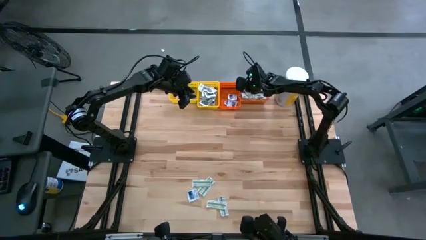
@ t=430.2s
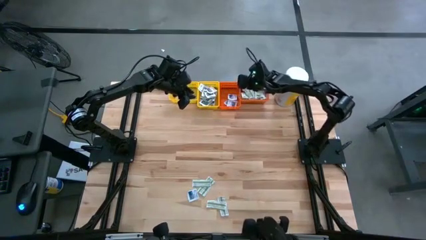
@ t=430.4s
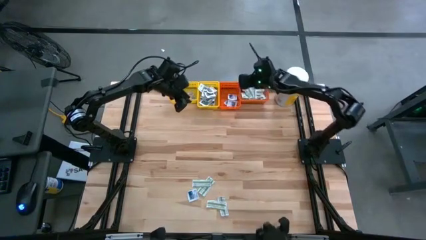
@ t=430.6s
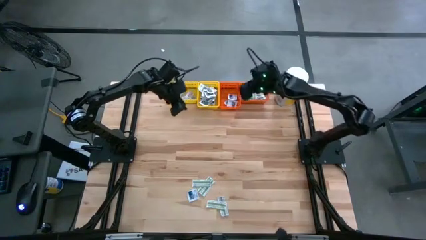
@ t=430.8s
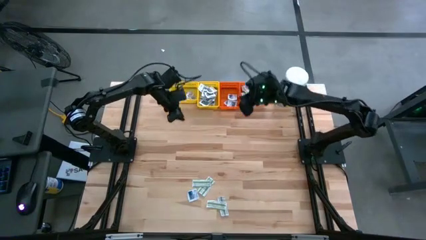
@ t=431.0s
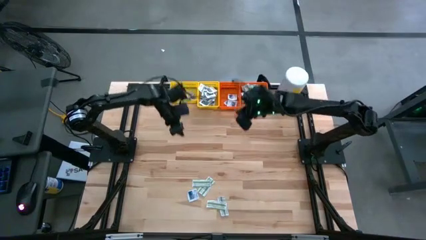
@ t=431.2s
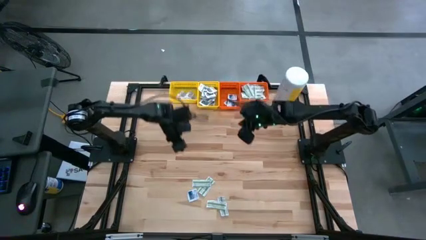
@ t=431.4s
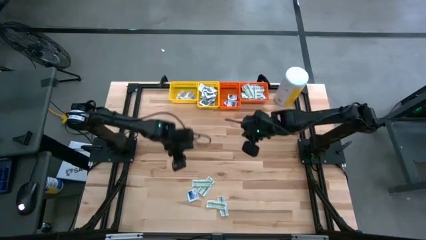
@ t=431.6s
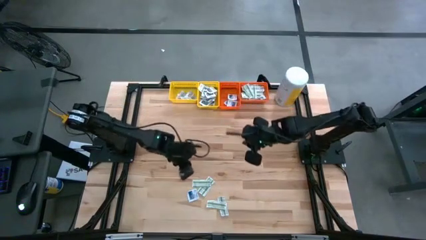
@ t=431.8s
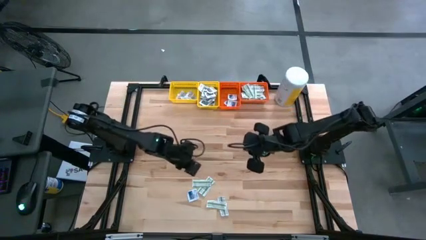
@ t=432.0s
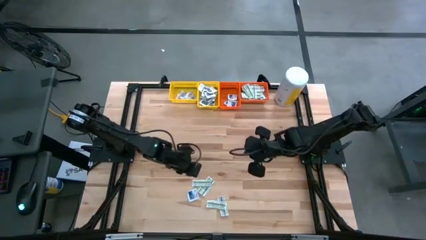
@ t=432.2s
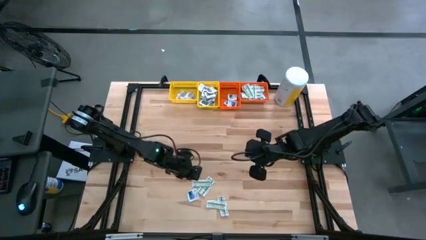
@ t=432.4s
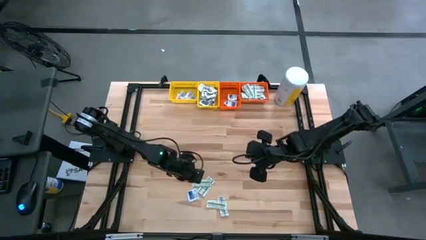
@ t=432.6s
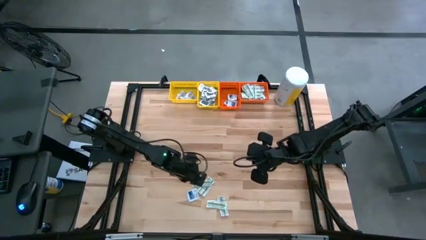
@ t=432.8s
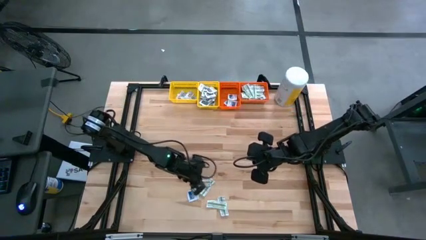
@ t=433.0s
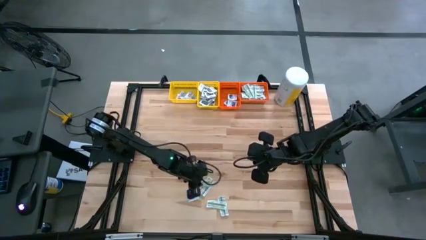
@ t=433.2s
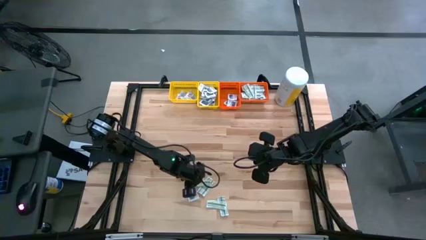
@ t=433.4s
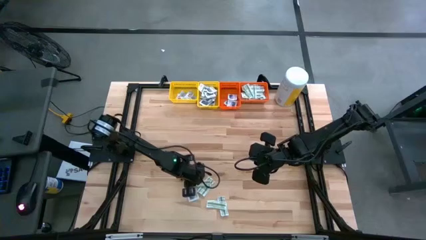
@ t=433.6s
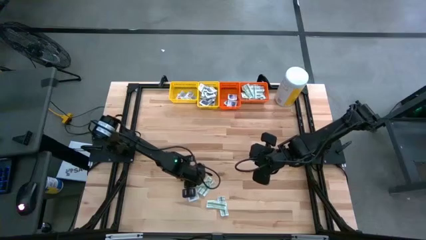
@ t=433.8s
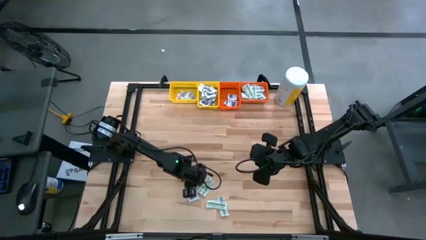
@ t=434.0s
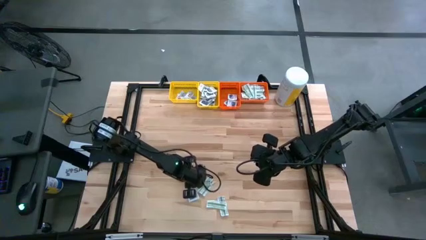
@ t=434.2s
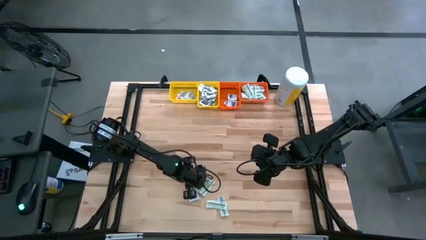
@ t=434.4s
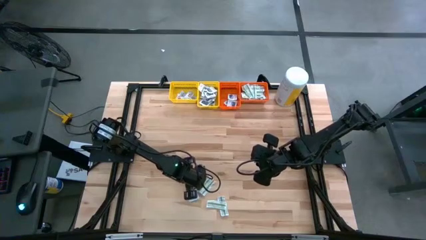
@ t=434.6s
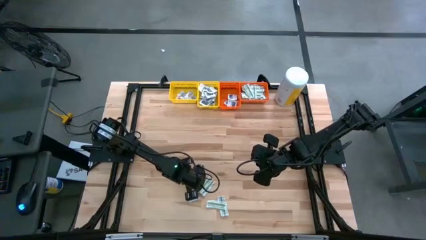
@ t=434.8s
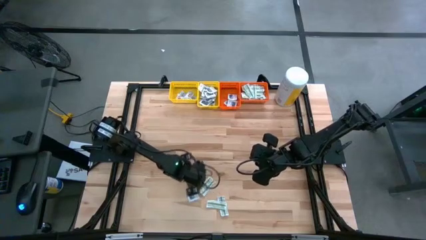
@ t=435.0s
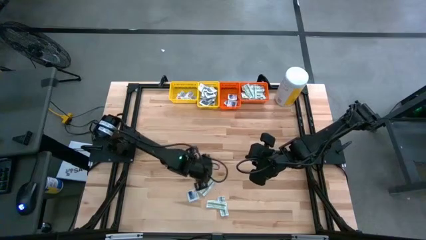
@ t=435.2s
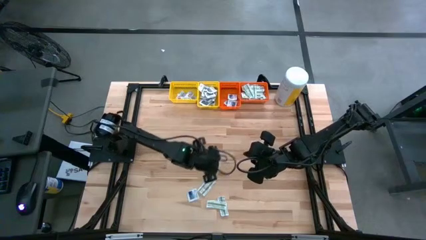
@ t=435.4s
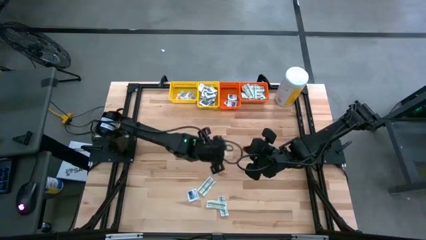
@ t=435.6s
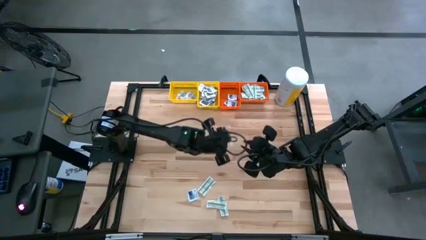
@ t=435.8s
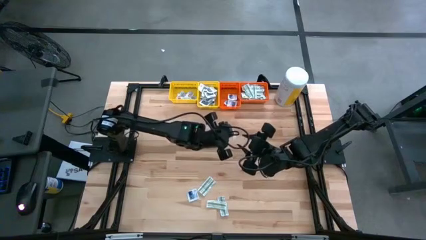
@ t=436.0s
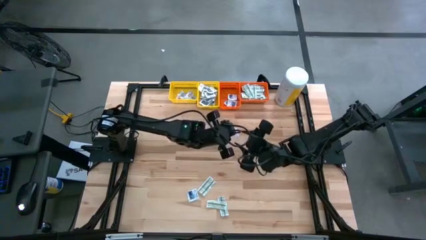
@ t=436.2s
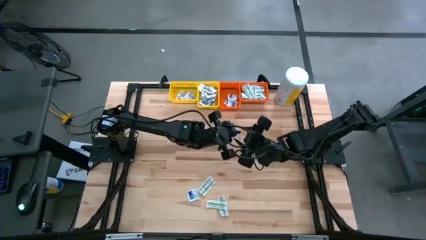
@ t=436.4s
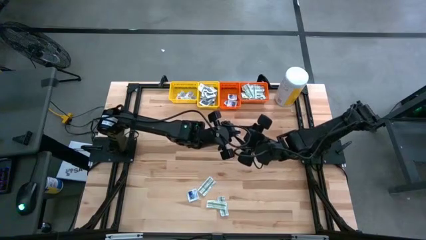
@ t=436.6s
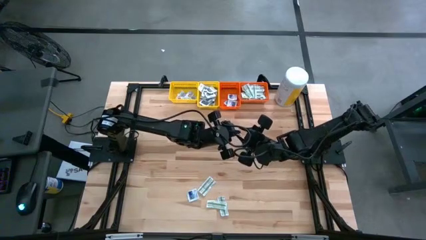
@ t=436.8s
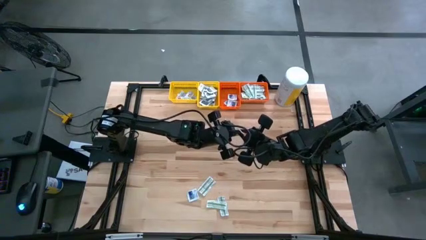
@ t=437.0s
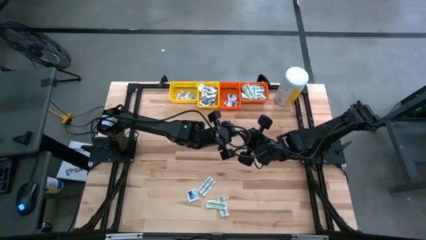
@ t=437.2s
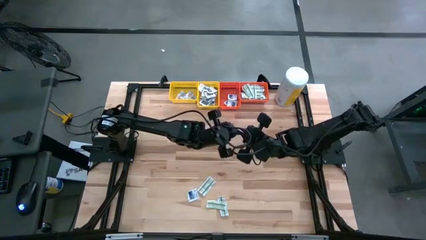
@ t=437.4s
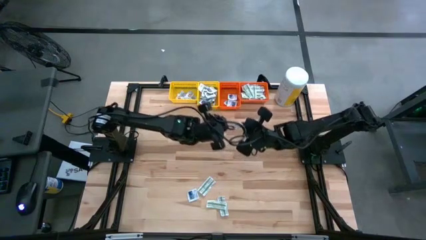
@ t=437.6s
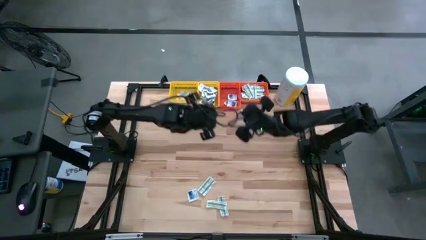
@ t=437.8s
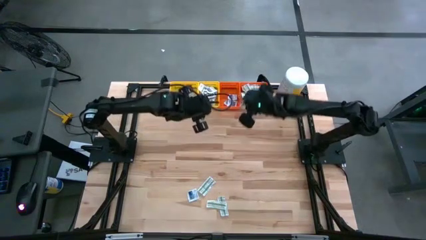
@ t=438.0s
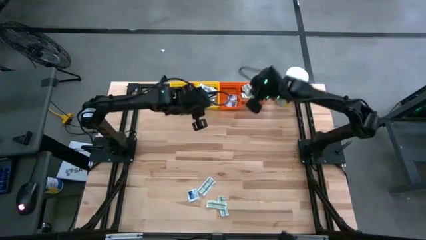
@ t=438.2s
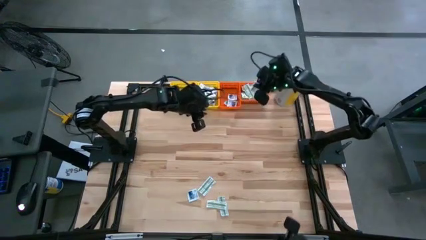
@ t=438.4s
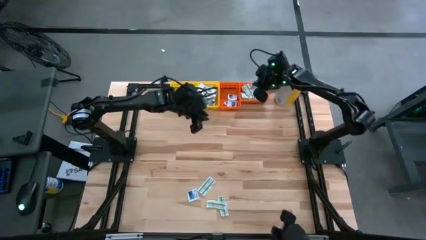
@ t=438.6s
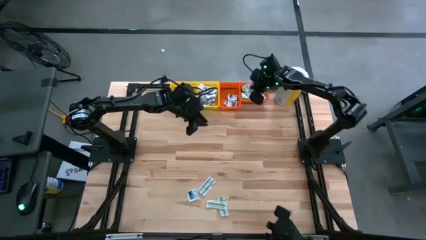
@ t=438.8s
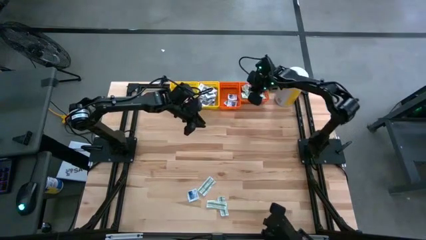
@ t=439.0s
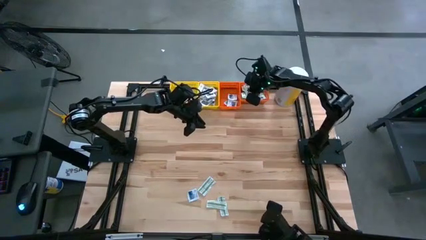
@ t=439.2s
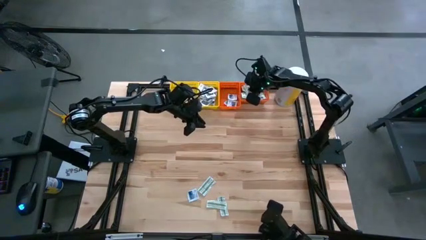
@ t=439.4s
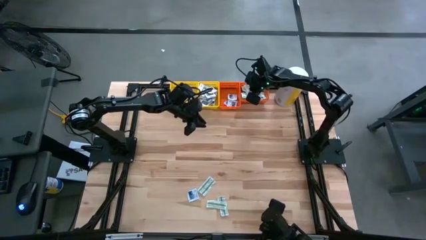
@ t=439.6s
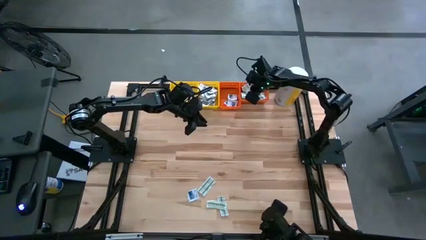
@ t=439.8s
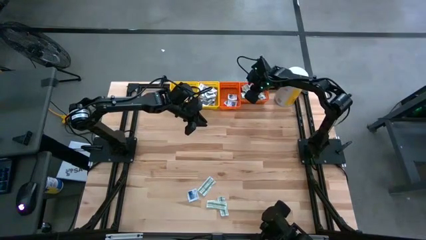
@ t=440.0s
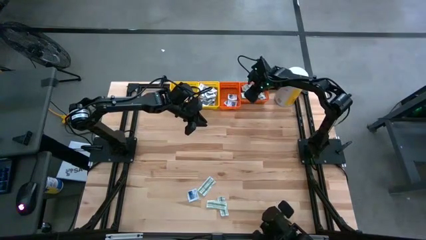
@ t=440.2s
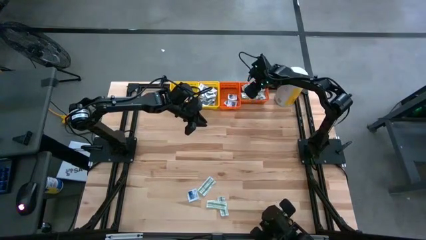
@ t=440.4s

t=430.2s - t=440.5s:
Task: Pick & Place First Aid Supplies
Put the green pad into the right orange bin

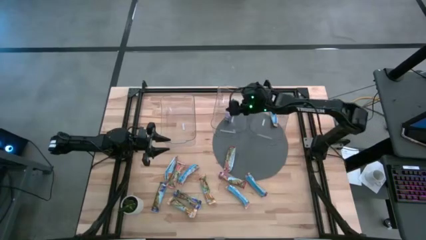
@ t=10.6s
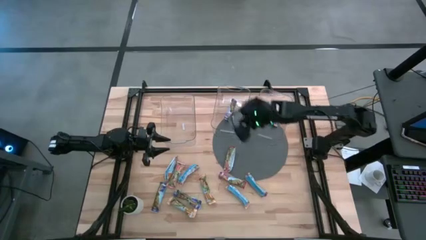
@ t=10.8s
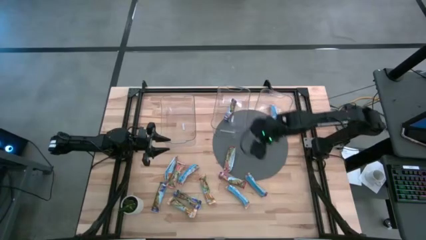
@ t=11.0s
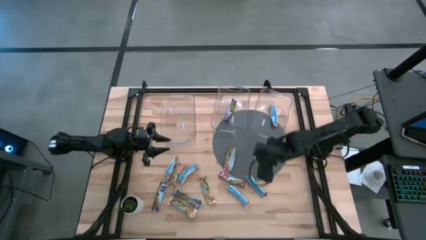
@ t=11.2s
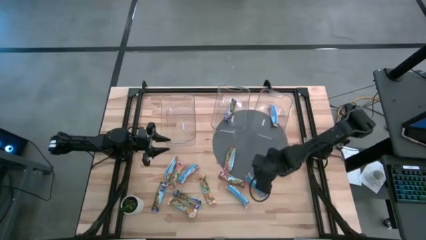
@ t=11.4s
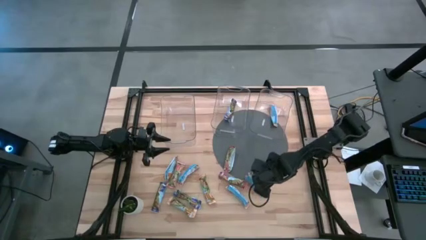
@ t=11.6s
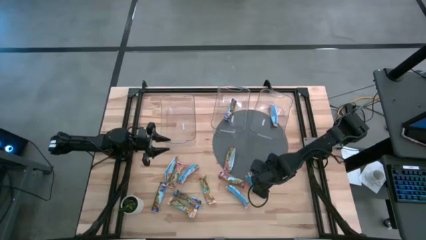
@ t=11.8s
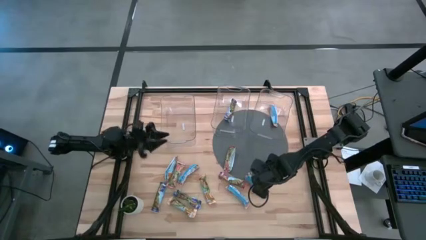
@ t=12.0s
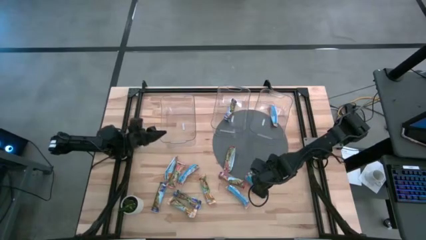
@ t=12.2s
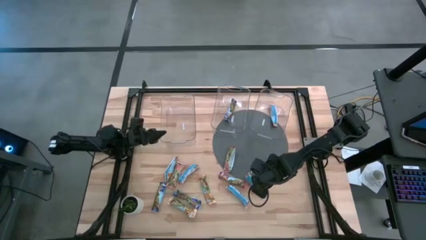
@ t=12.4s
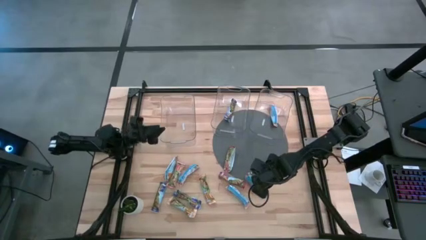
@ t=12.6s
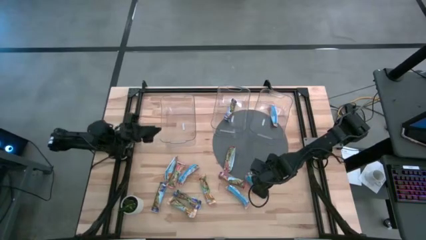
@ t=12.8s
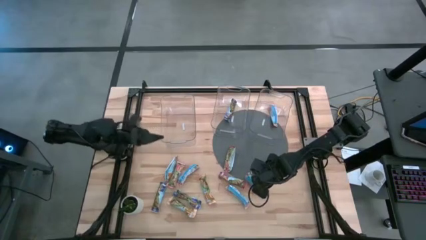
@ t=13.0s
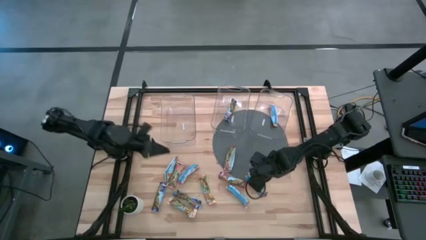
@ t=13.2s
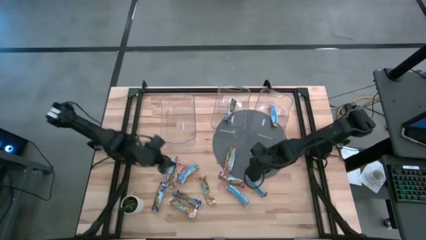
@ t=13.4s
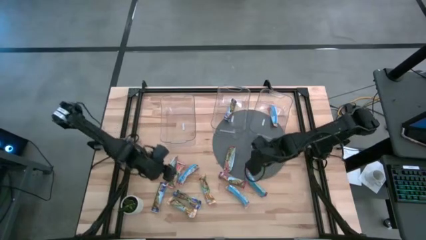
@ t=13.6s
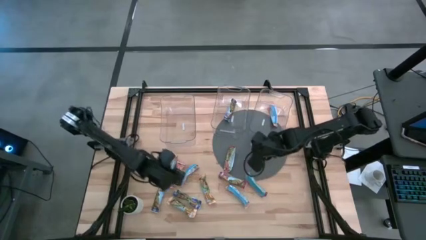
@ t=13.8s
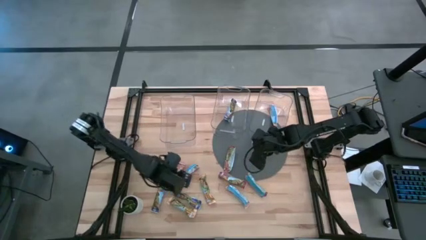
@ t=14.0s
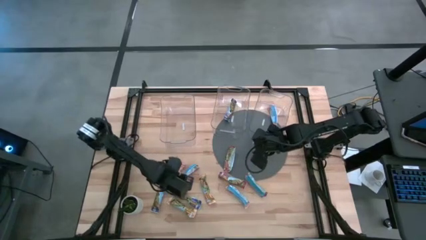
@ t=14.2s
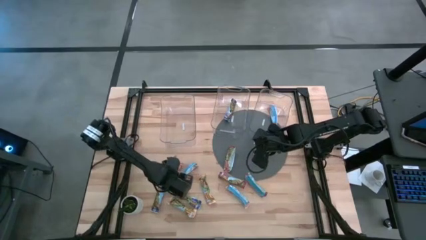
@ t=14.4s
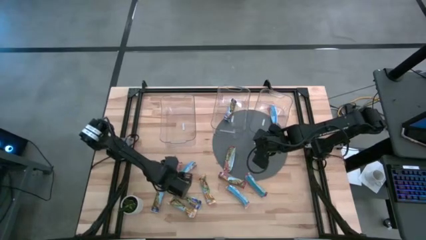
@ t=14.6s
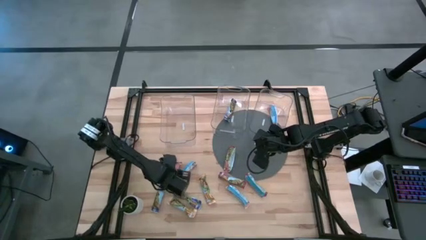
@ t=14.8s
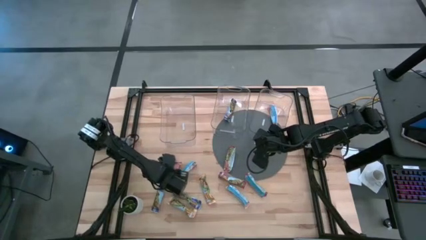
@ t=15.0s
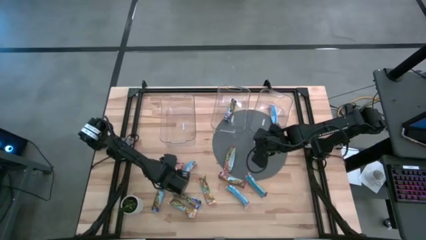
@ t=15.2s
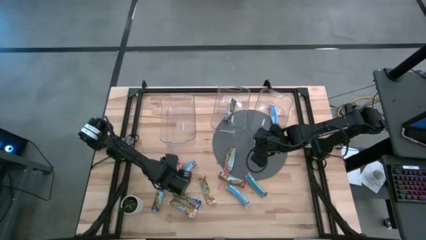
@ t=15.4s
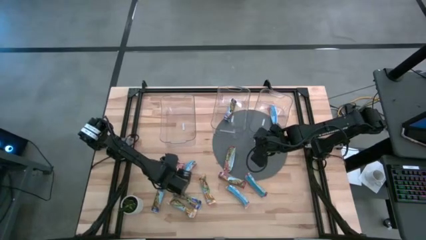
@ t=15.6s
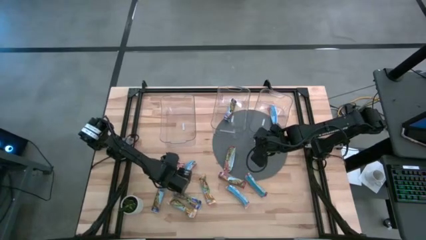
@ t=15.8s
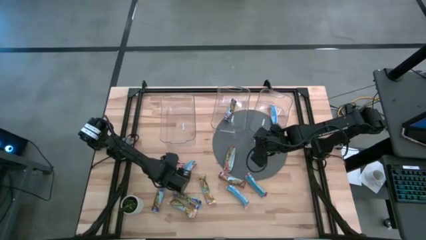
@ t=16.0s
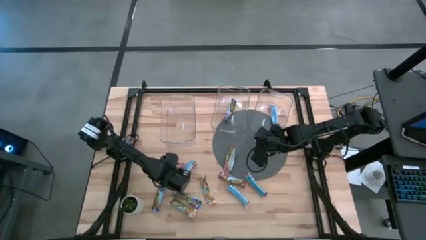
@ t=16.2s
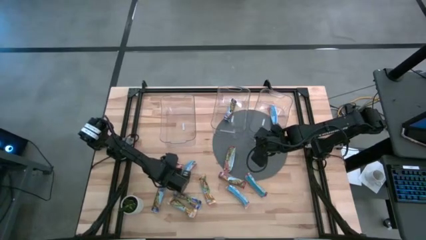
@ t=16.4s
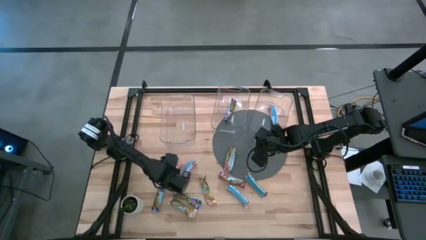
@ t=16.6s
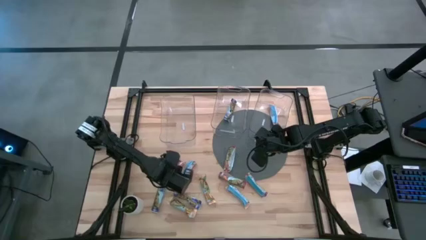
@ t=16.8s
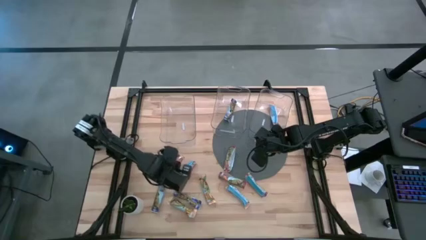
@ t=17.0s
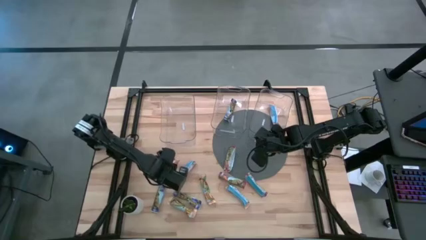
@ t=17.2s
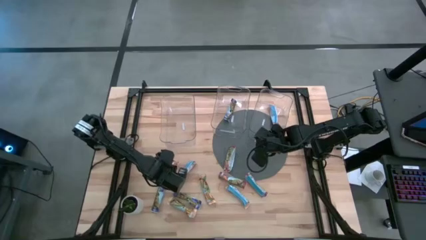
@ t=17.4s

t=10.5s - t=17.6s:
Task: Pick and place Granola Bars by type
Put the red granola bar into the left transparent bin
